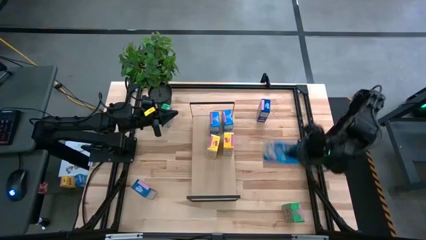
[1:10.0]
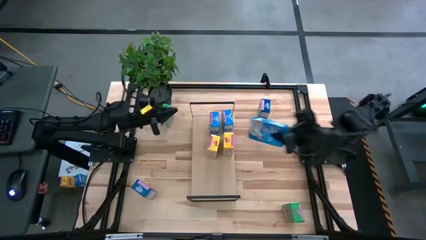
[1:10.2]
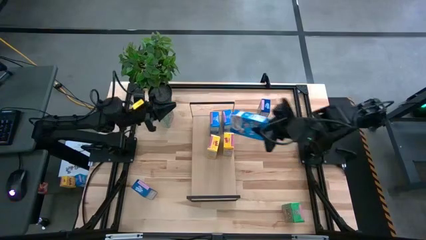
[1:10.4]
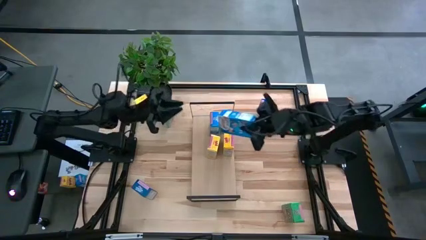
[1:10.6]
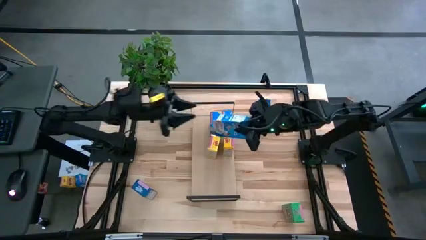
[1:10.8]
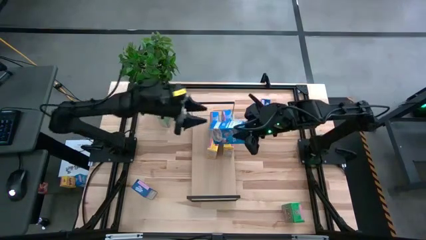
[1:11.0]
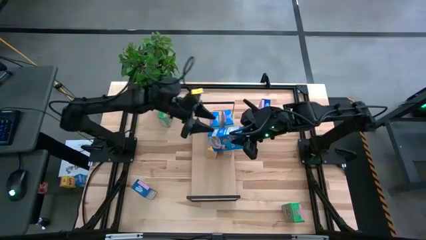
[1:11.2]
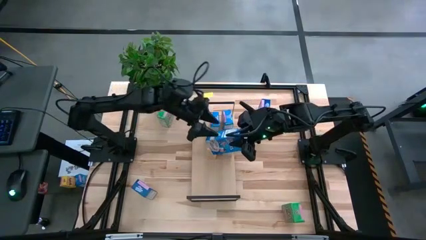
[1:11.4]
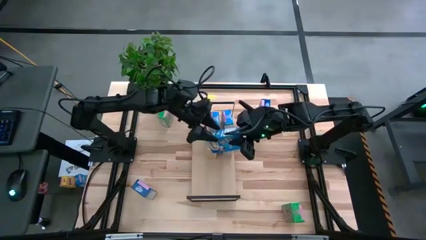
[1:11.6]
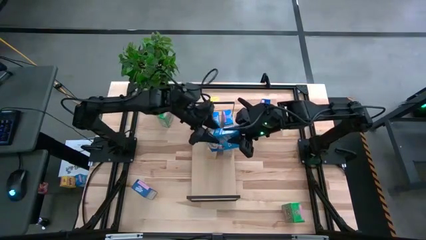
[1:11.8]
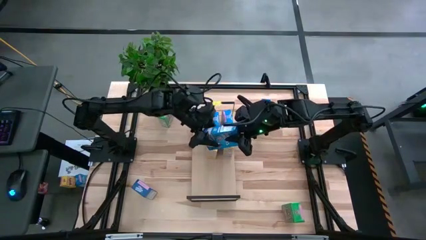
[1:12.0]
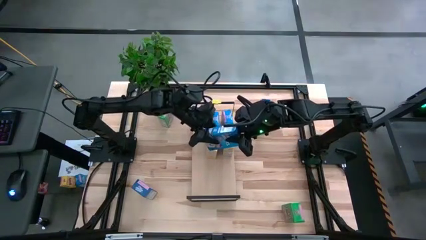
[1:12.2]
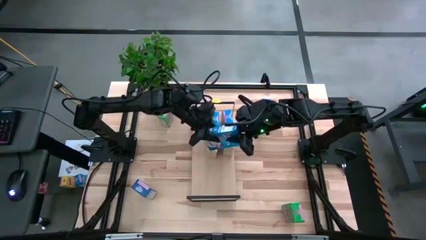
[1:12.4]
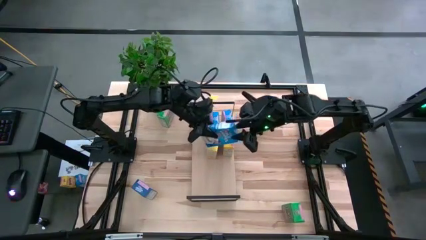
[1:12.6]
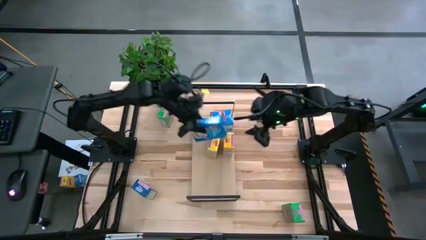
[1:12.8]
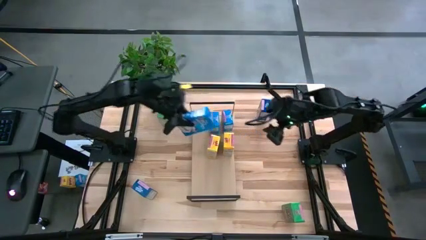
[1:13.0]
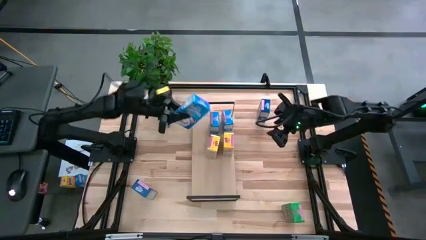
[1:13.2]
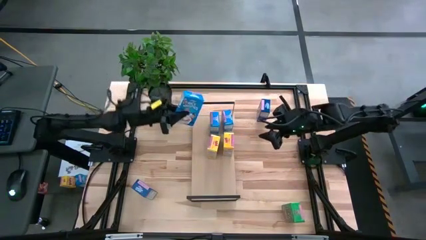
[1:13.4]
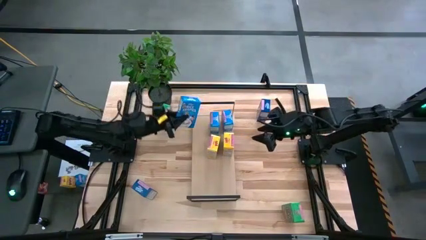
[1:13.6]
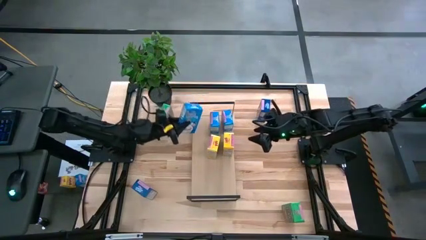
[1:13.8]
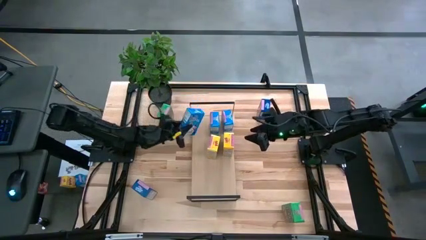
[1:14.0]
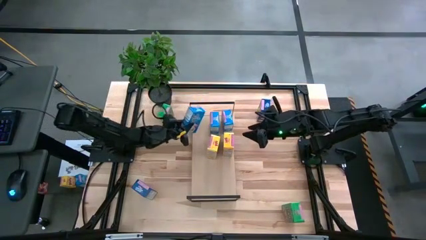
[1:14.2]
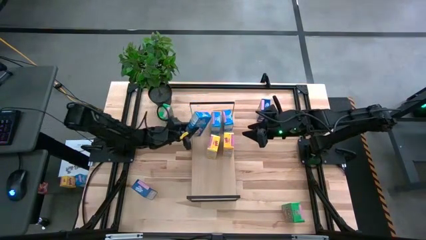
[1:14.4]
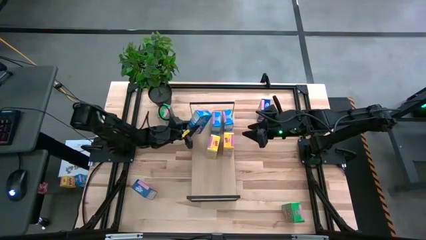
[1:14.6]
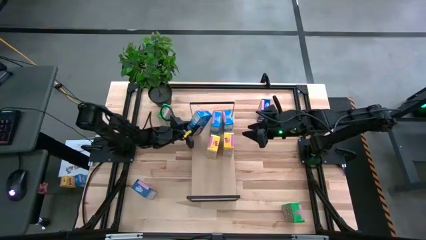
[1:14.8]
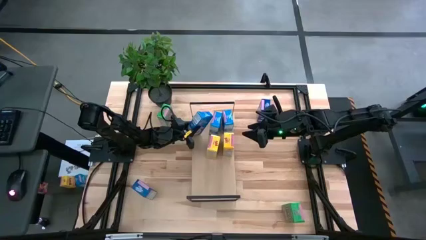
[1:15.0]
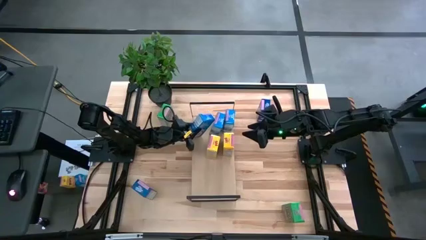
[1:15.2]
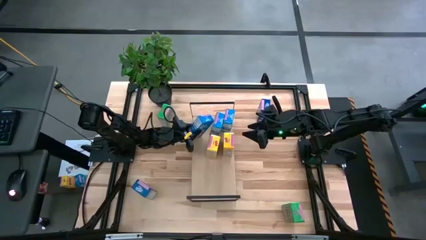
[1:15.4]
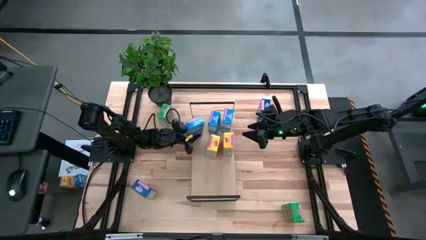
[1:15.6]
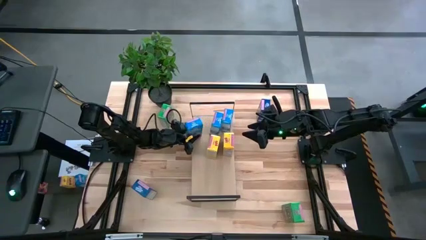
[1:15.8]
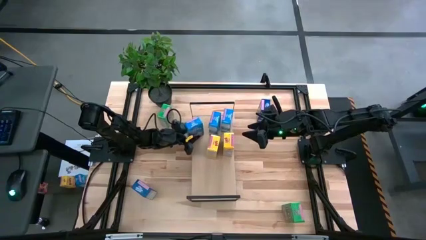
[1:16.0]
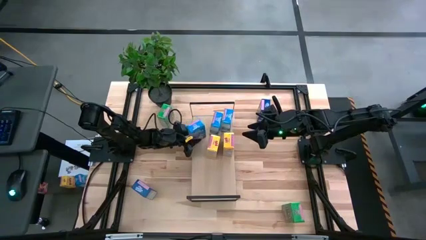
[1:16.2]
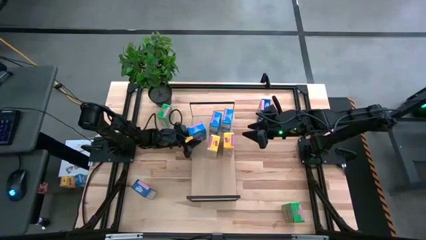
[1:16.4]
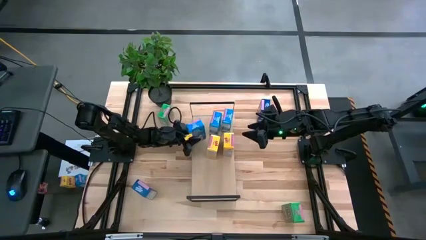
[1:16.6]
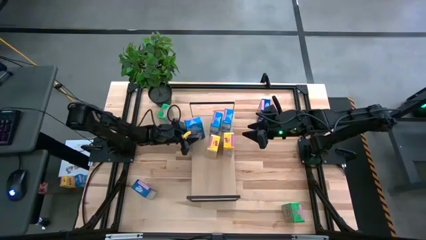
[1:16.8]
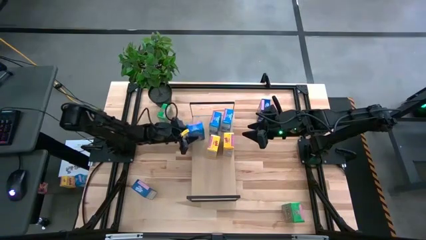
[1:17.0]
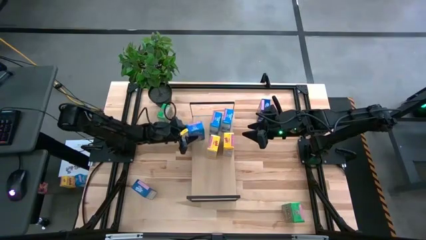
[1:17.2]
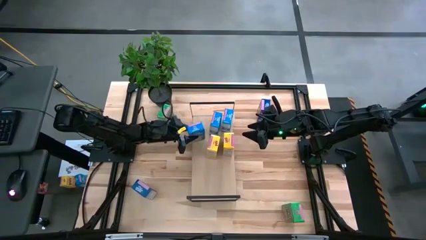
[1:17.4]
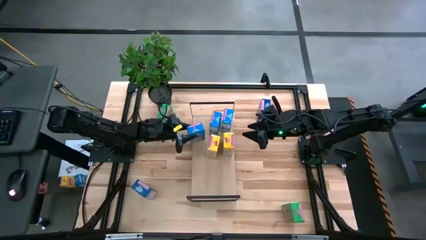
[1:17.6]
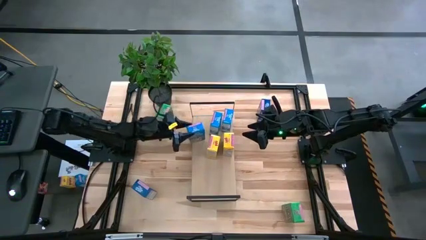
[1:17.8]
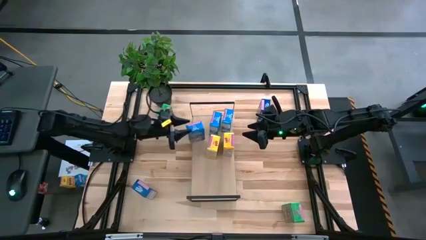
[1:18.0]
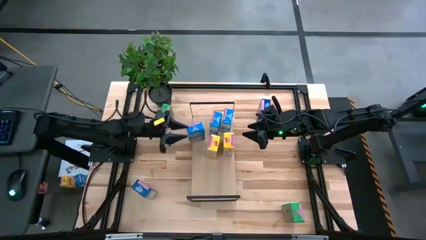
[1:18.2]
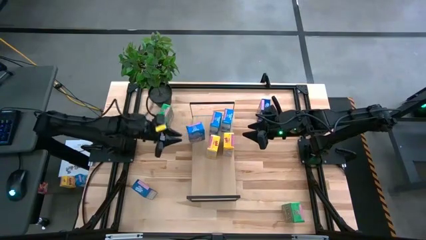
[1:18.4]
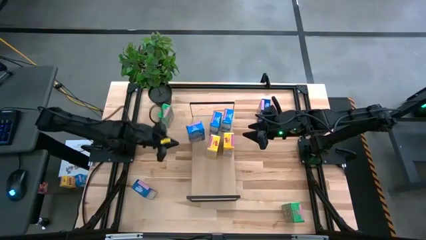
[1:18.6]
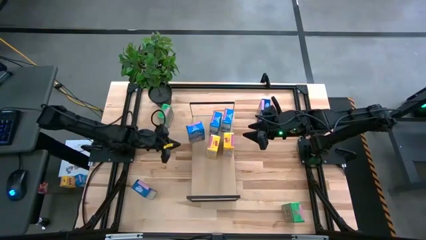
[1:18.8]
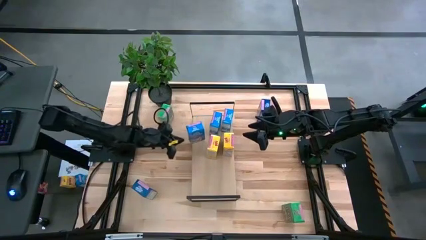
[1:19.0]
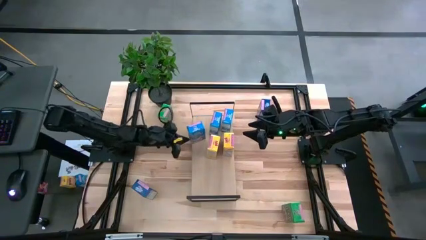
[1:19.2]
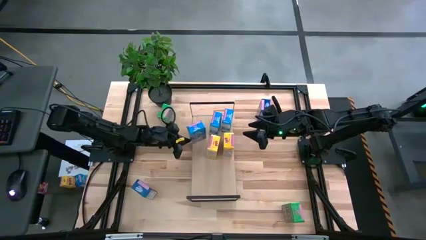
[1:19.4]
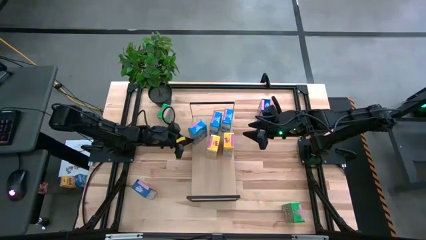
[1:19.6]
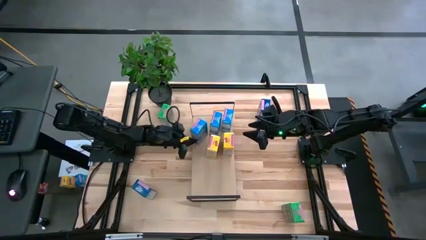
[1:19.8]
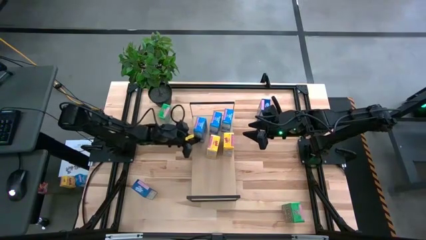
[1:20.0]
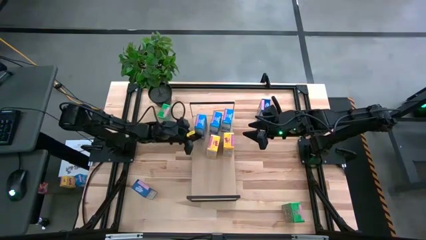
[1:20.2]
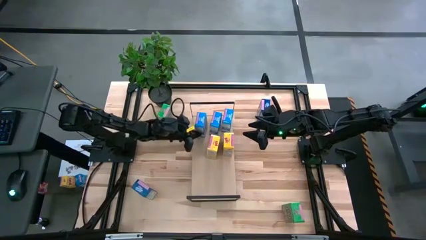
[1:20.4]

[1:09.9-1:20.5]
Task: Stack cereal on shelf
Put the light blue cereal box on the shelf aligned with the other light blue cereal boxes

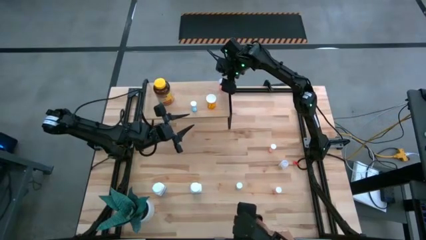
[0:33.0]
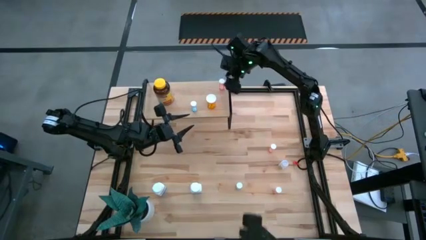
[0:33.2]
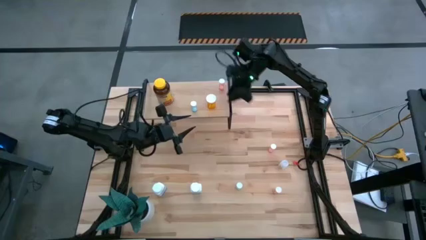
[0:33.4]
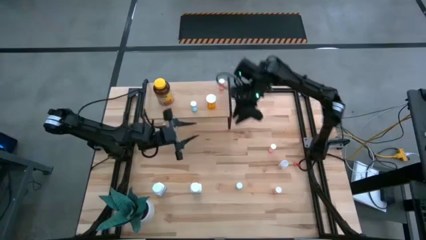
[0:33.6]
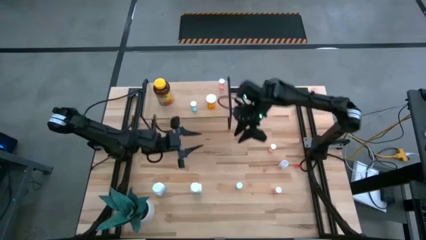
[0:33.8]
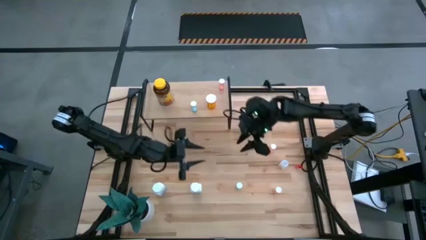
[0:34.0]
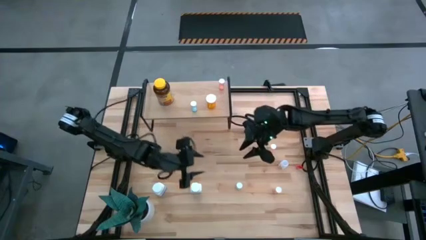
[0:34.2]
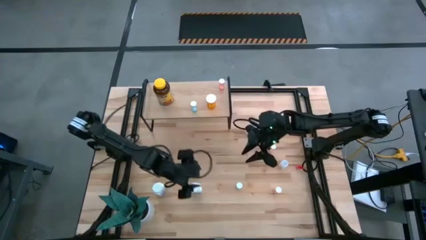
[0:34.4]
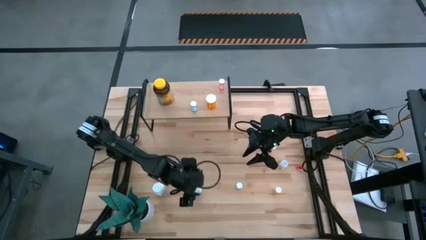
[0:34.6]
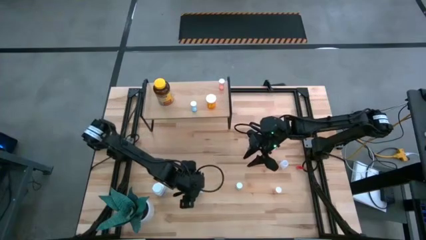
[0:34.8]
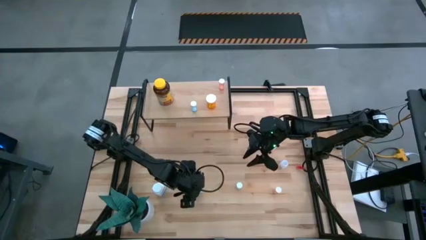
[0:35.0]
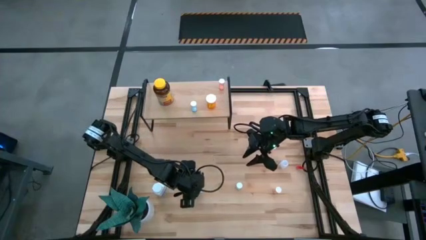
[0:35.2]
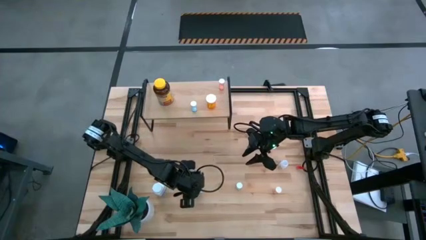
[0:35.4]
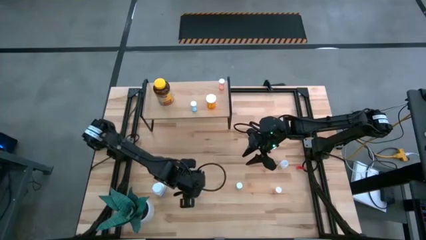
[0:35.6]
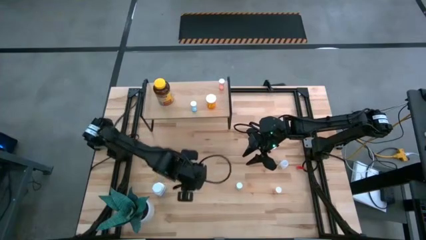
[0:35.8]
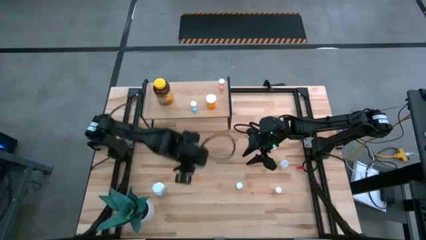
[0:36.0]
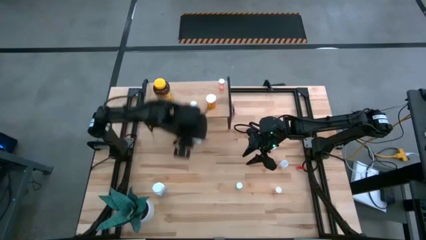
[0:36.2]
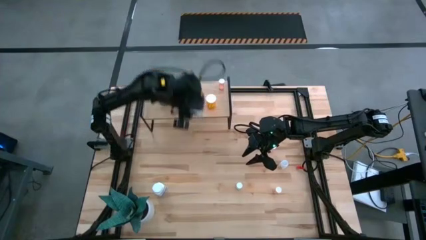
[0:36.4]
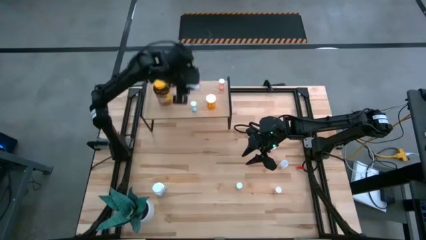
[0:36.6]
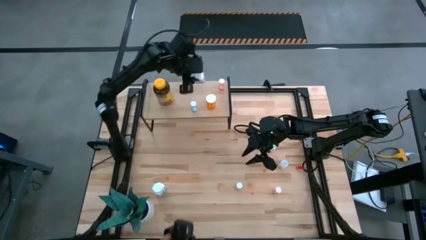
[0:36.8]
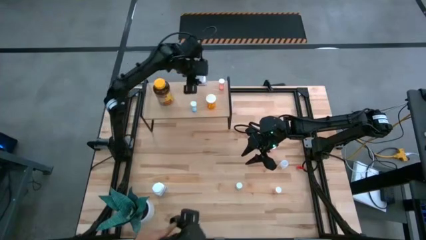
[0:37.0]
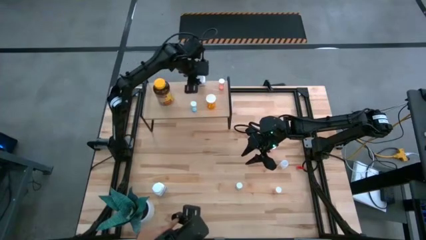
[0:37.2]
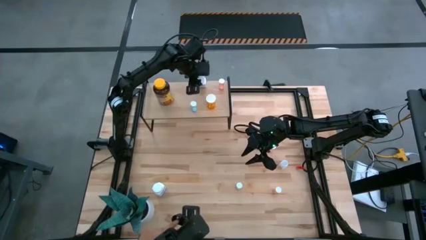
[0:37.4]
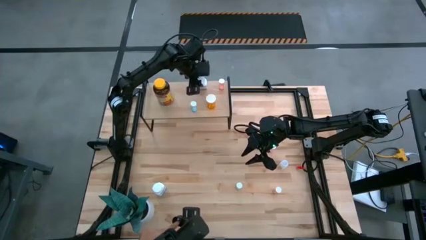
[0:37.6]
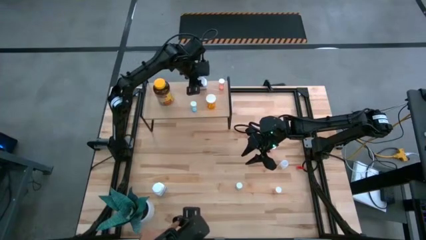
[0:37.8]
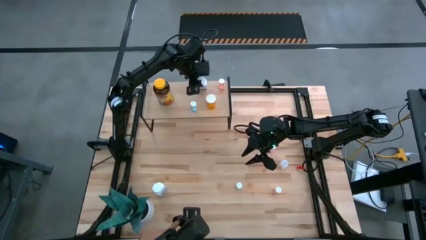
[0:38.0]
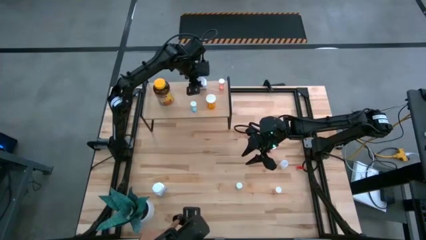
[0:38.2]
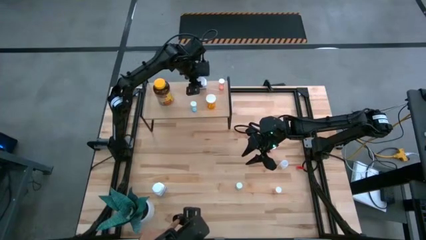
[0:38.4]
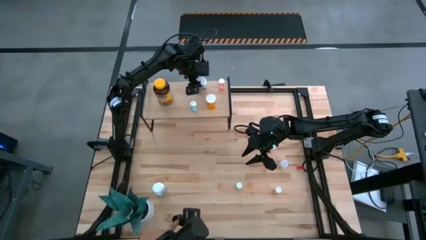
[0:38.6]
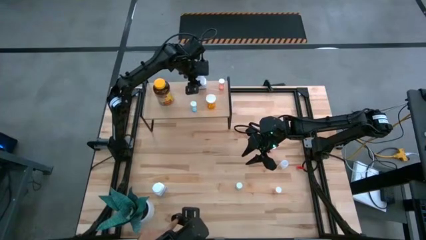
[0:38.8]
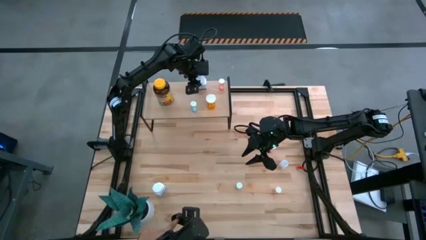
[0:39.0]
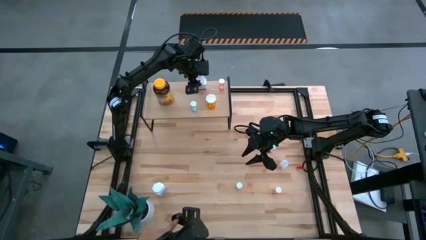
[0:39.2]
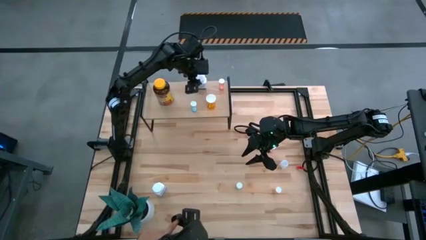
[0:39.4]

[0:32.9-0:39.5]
Task: Pick and place medicine bottles onto shelf by color
Put the right white pill bottle on the shelf

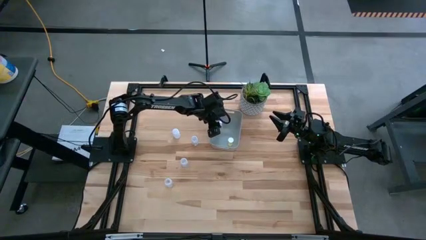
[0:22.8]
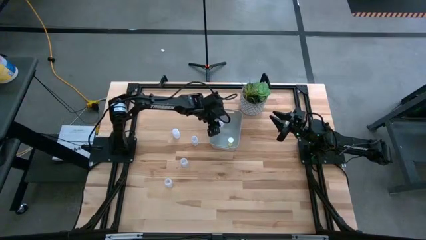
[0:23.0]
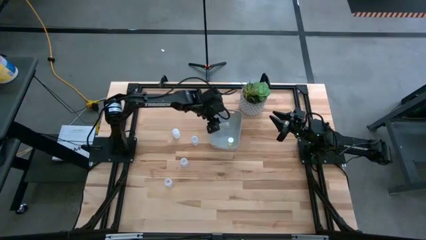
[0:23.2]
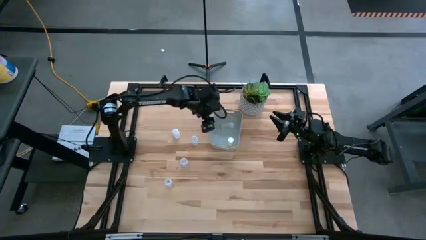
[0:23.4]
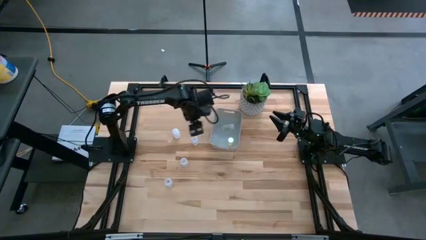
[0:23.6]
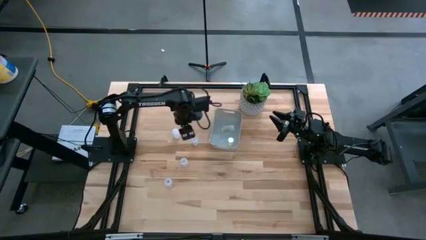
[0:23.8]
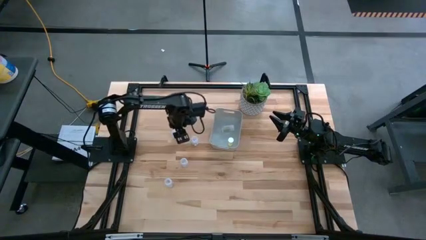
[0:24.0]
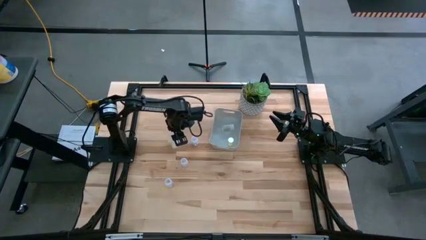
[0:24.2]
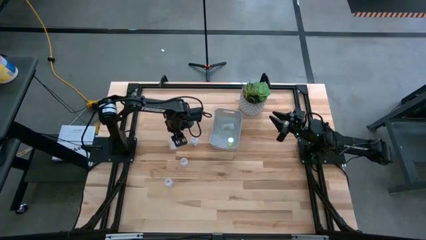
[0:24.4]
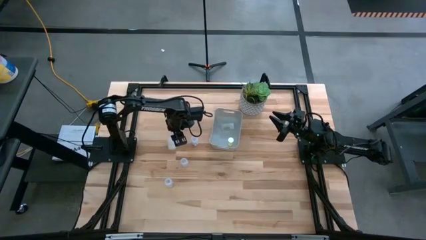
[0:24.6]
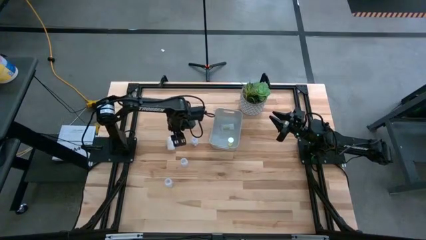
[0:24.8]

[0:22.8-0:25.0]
Task: Pick and place pill bottles into a basket
Put the transparent pill bottle into the white bin
